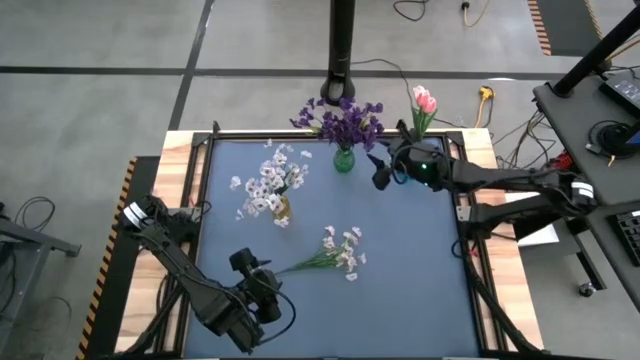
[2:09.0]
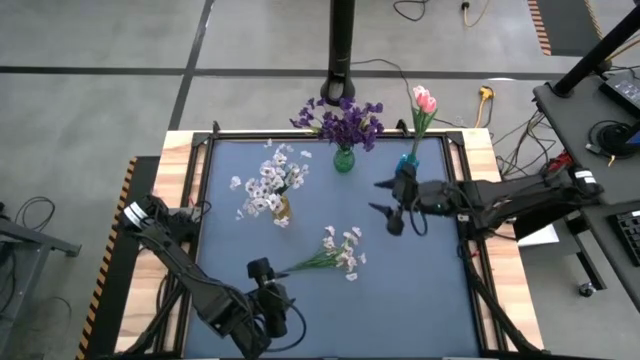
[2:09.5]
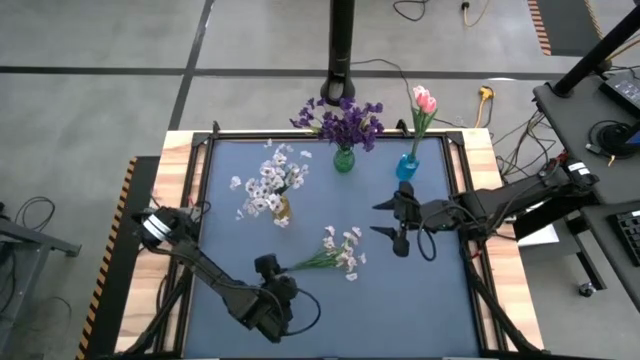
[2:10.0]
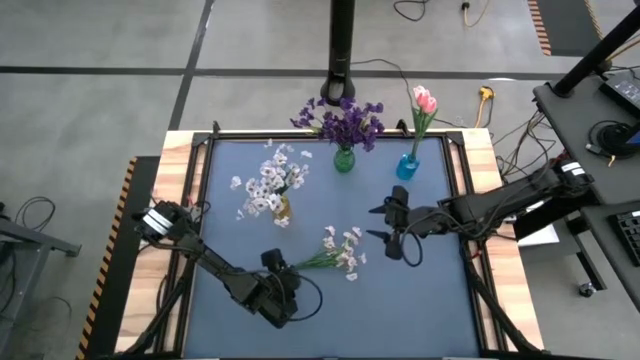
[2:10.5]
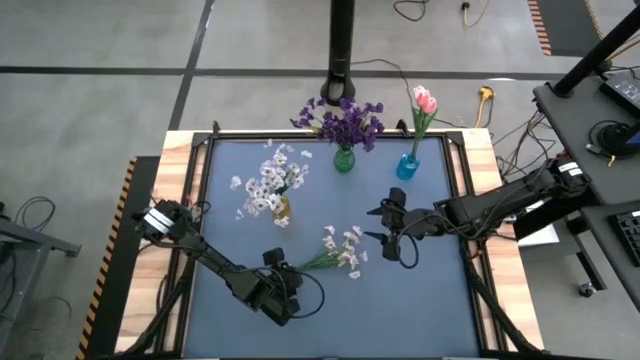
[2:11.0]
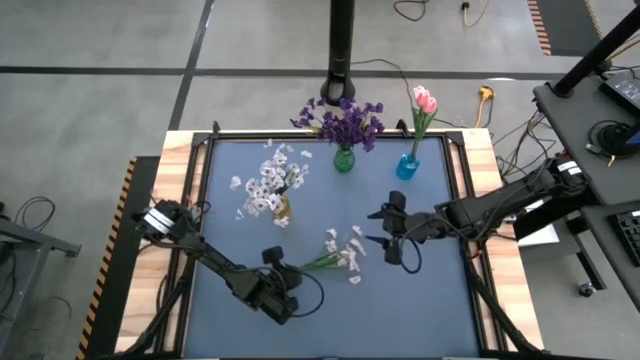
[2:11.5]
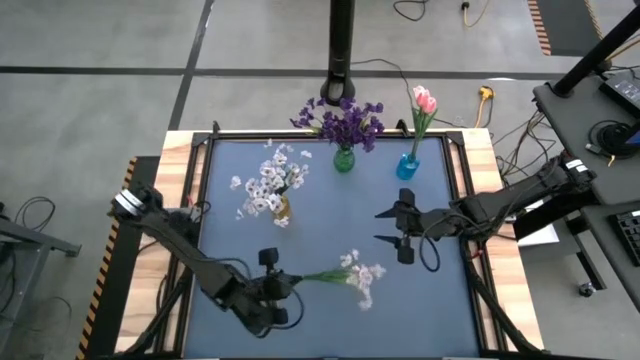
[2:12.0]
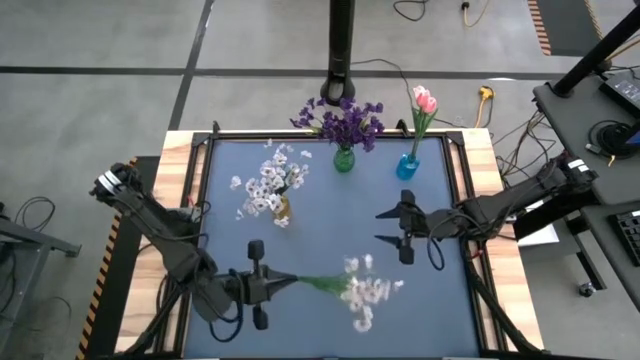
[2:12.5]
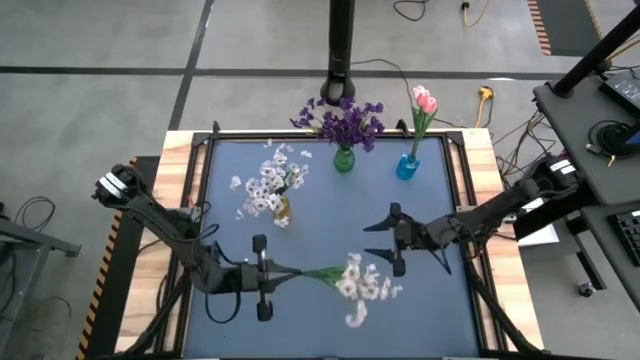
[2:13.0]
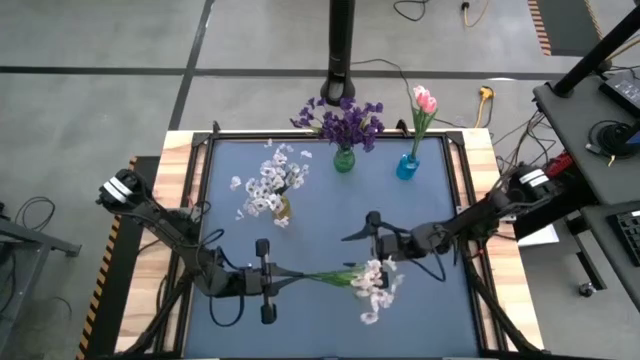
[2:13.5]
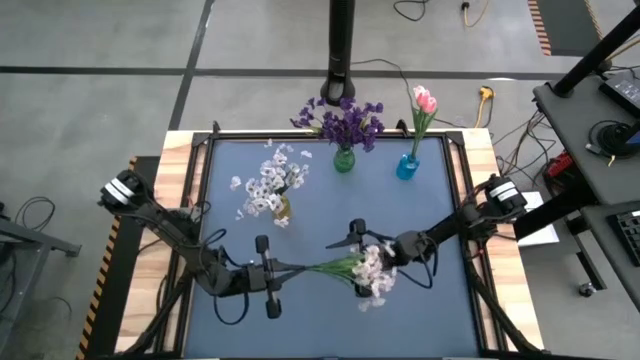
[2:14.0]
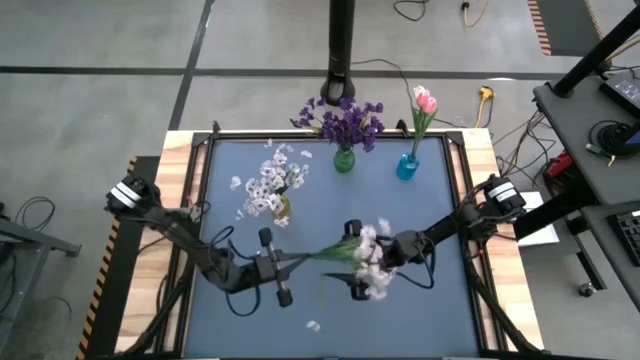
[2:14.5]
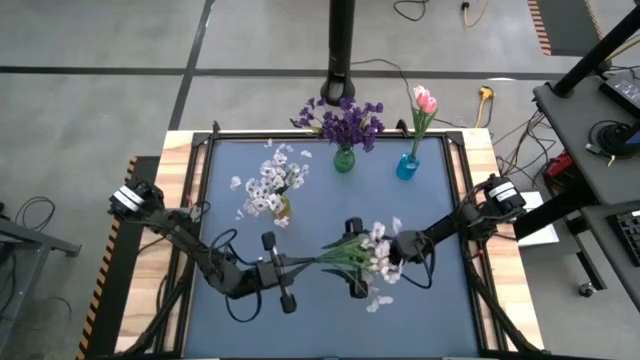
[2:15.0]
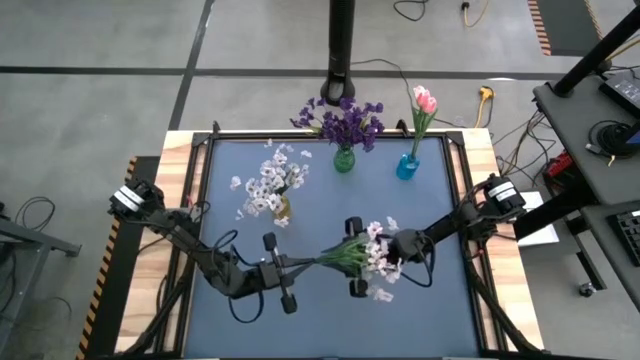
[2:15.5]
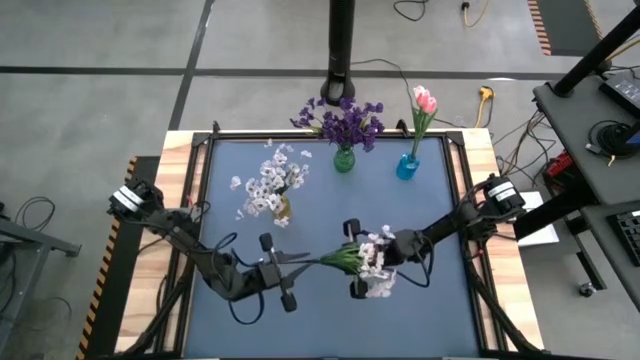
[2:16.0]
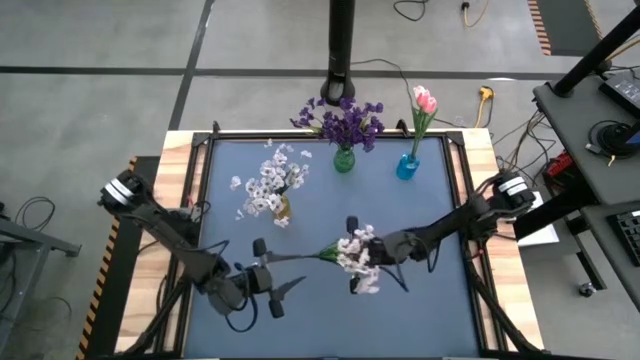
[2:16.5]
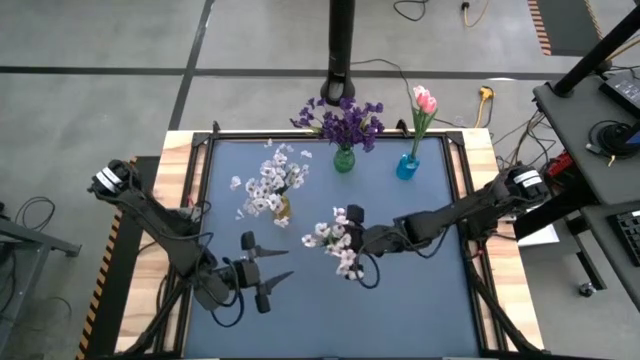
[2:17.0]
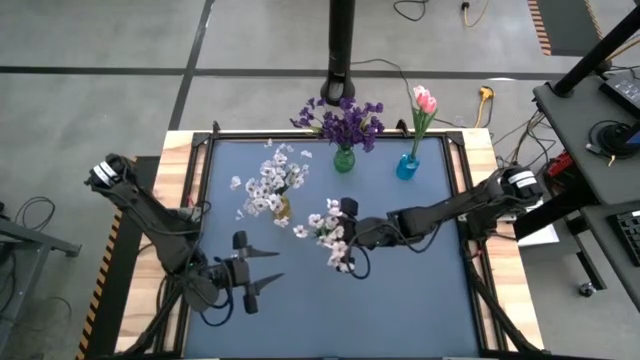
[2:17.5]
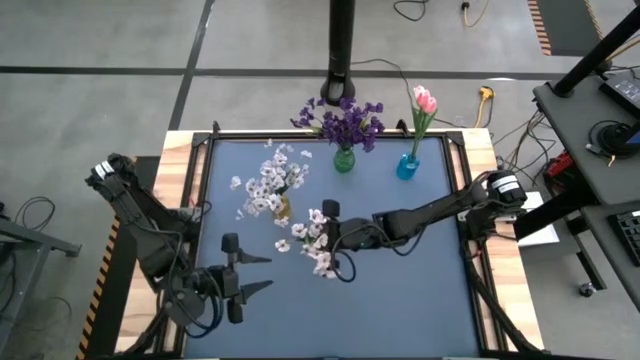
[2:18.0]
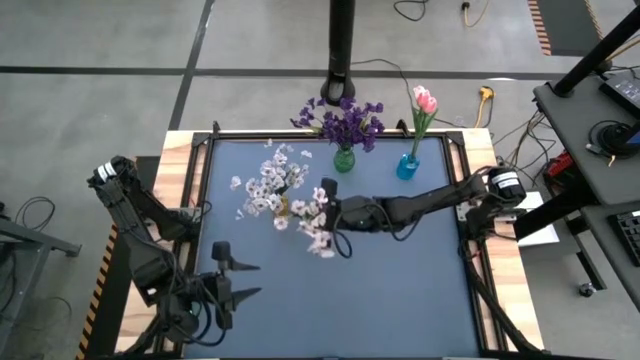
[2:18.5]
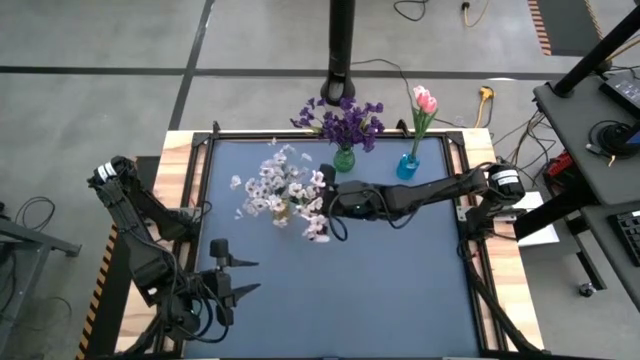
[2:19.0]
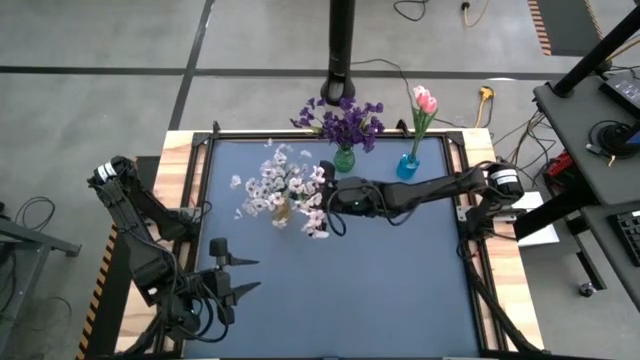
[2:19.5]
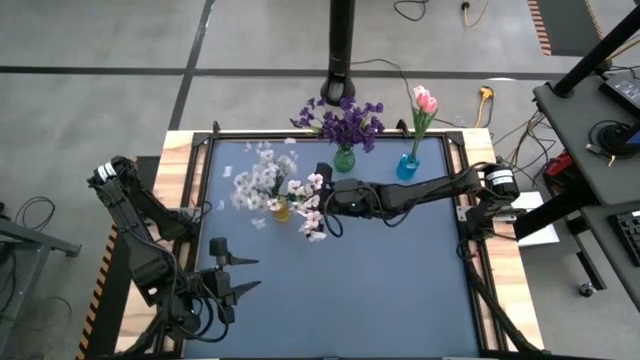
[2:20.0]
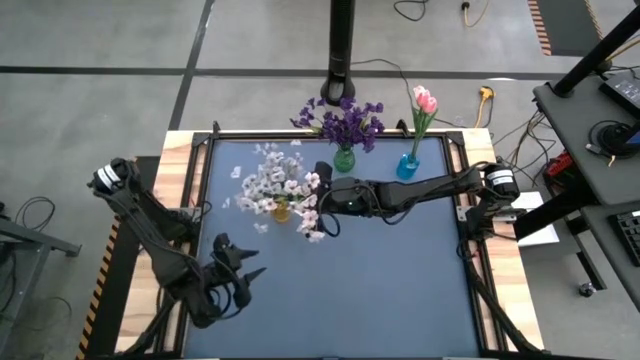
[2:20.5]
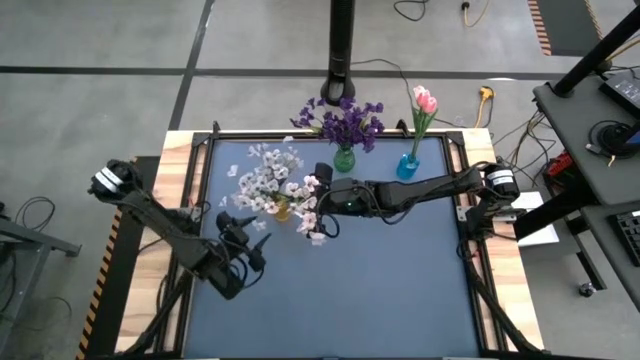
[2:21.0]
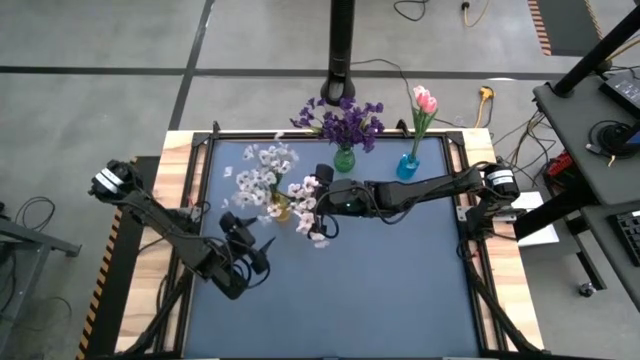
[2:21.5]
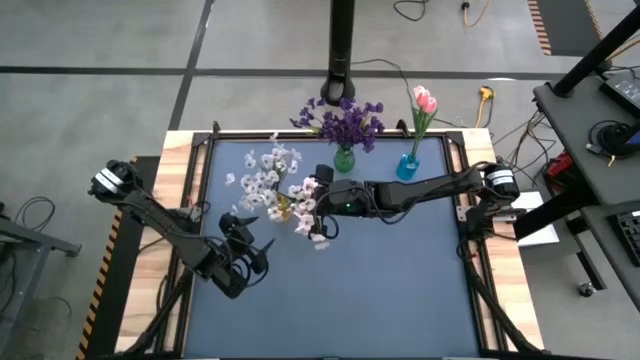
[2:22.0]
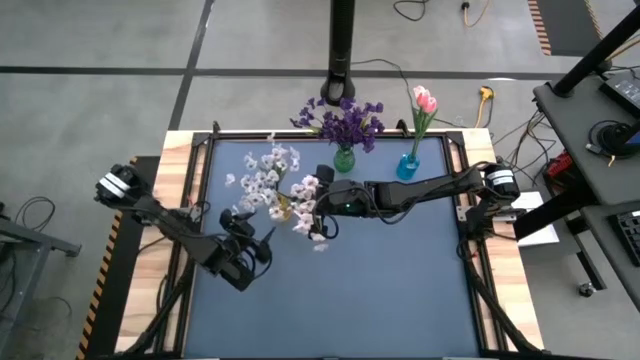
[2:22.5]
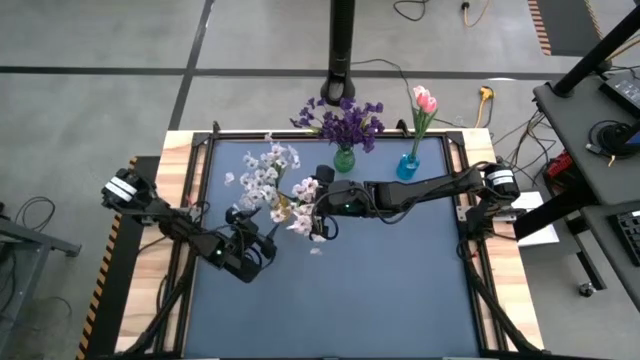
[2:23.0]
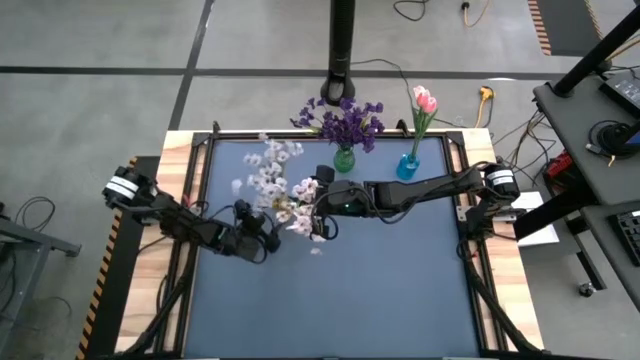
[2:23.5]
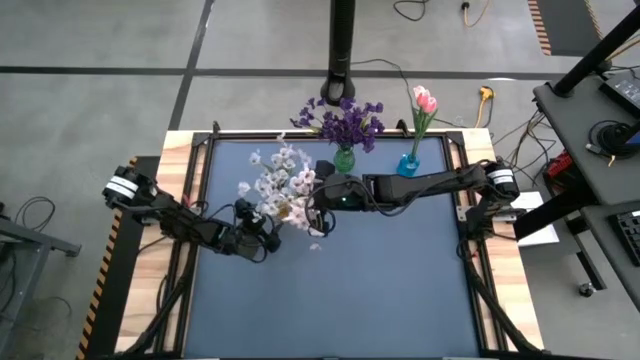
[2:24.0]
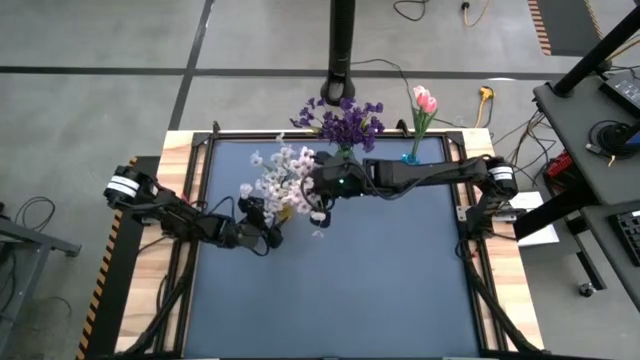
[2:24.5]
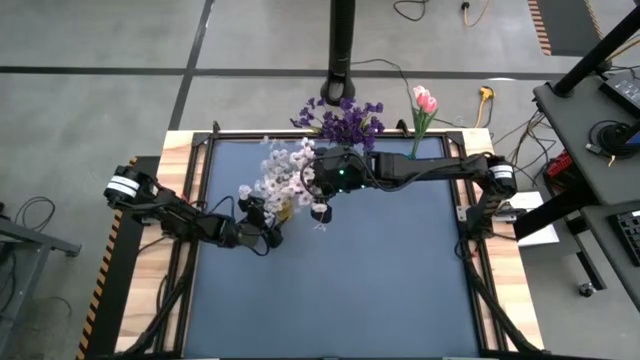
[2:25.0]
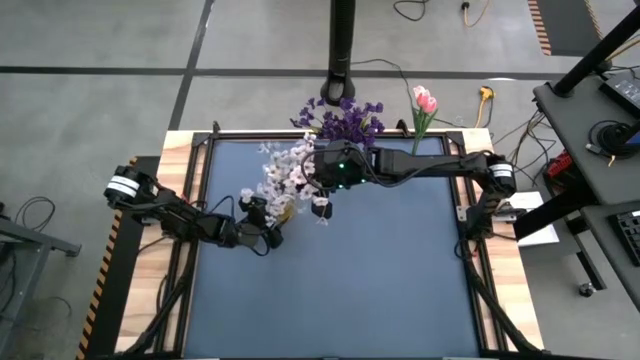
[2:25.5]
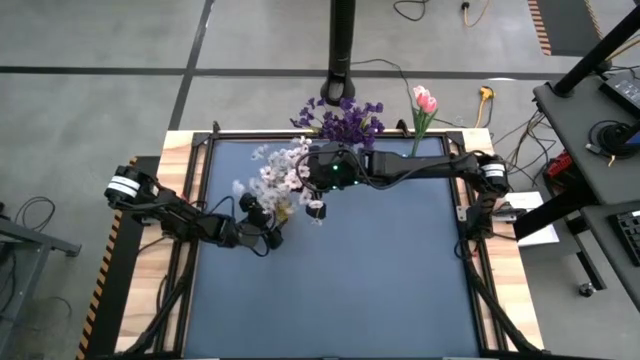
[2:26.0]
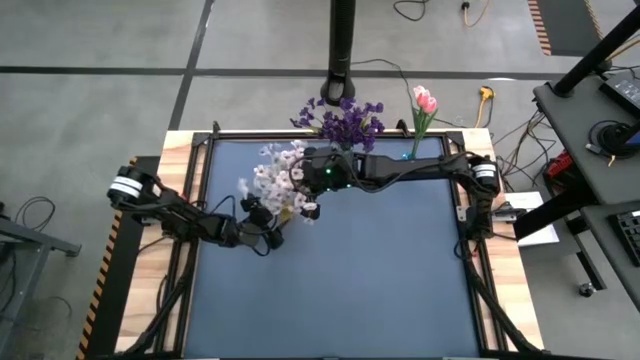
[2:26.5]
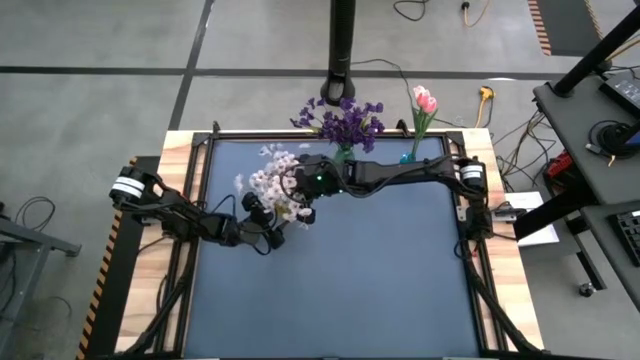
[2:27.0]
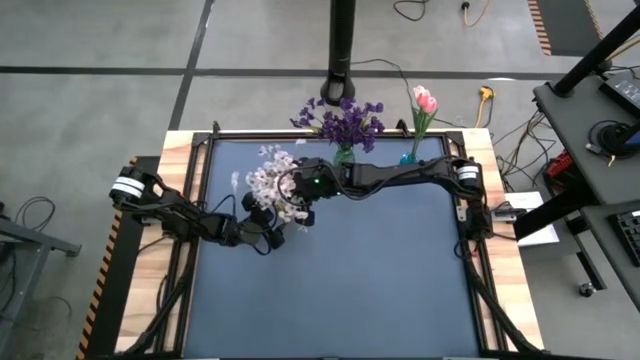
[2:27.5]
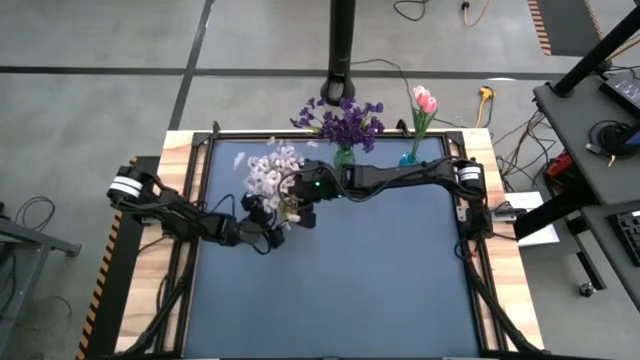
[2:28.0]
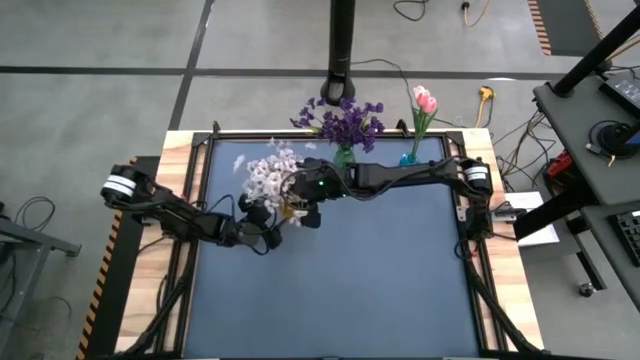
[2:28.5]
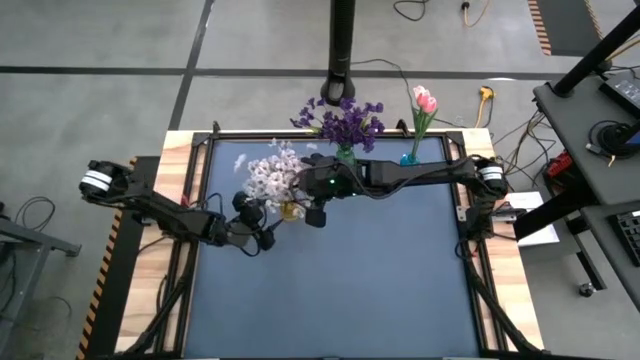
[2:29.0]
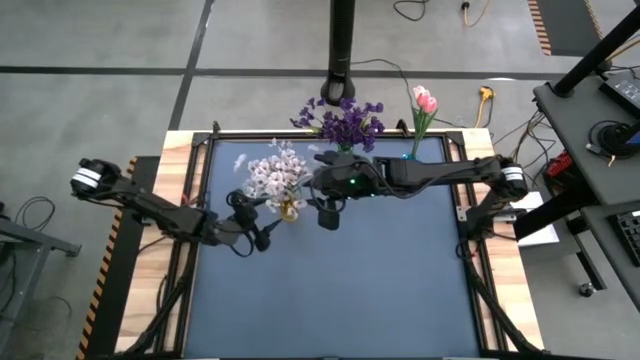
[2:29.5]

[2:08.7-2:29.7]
Task: Sort flowers into vase by color
Put the white flowers into the yellow vase
